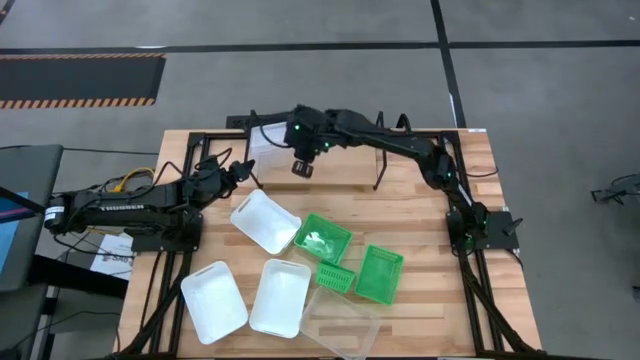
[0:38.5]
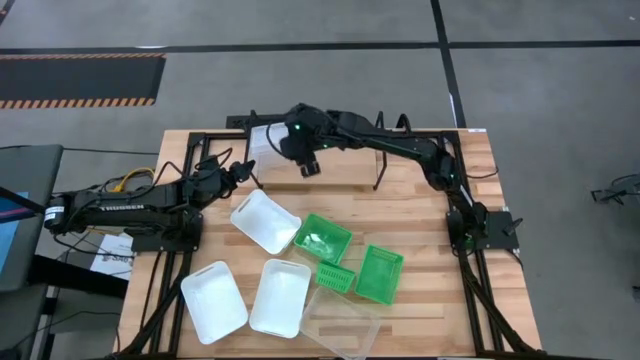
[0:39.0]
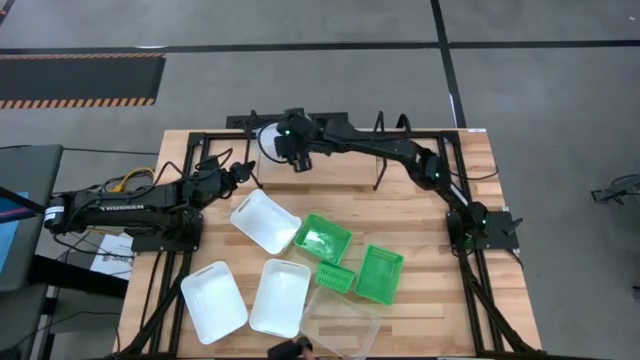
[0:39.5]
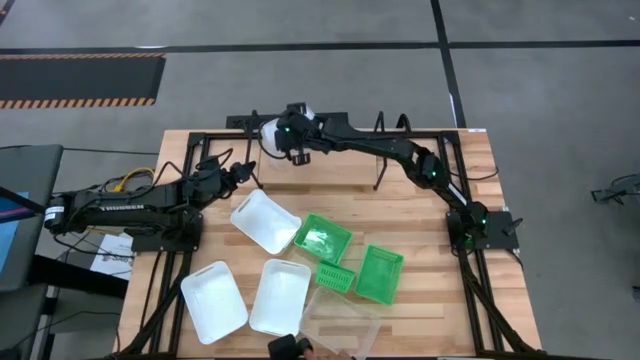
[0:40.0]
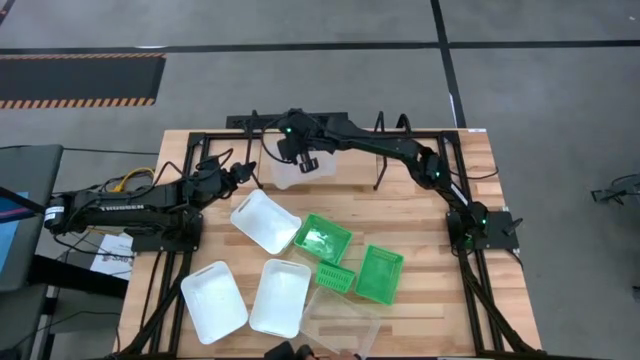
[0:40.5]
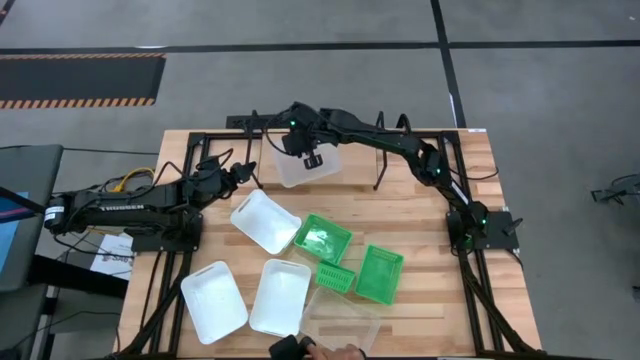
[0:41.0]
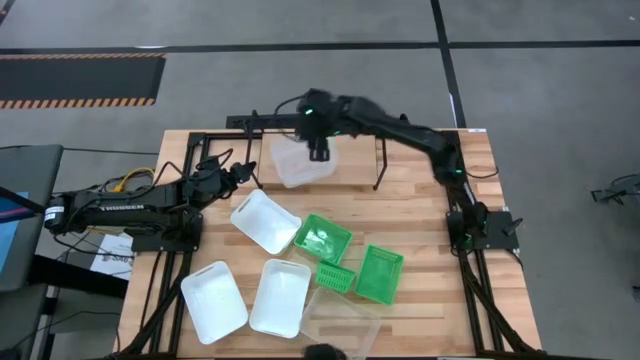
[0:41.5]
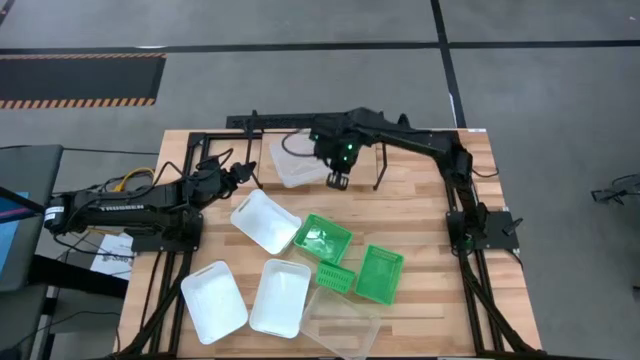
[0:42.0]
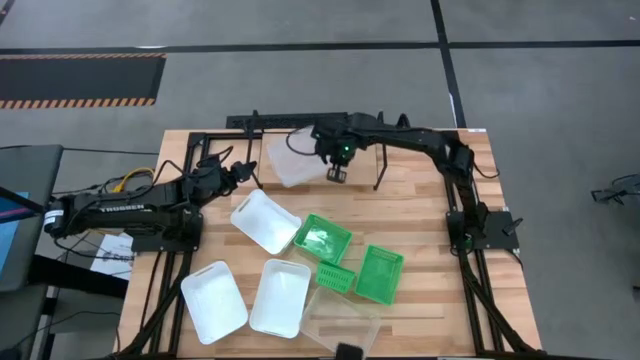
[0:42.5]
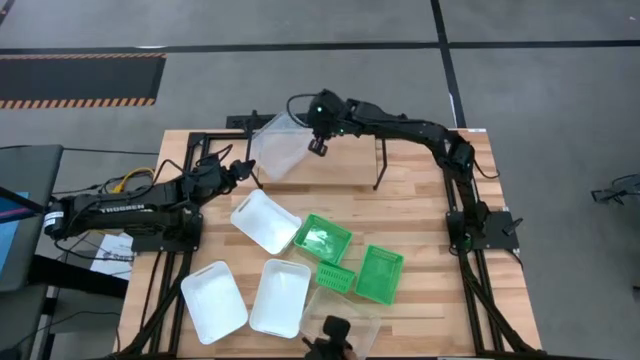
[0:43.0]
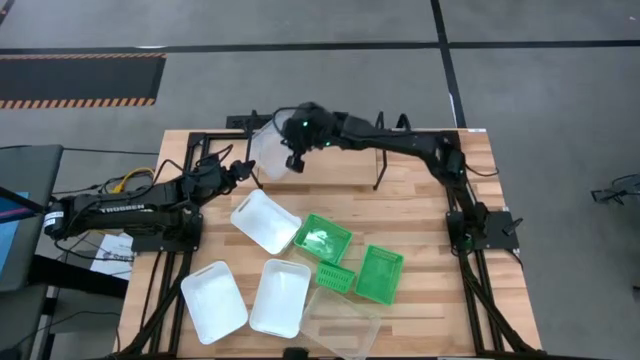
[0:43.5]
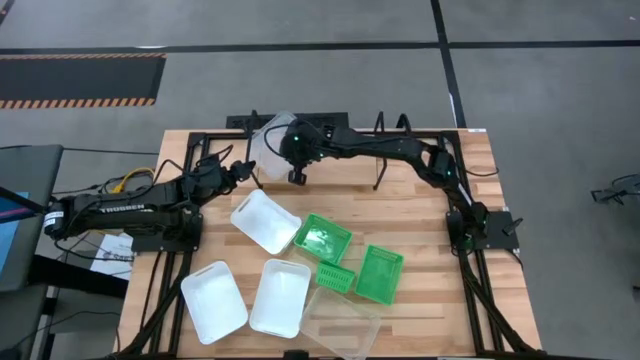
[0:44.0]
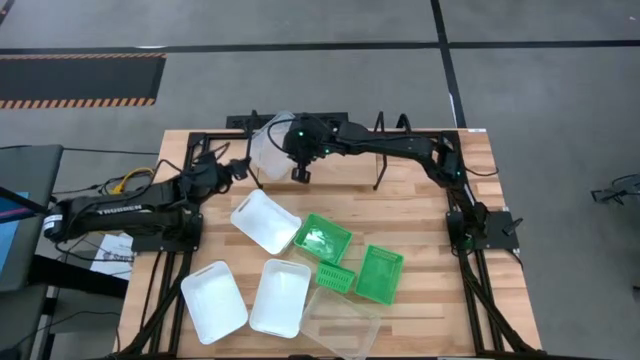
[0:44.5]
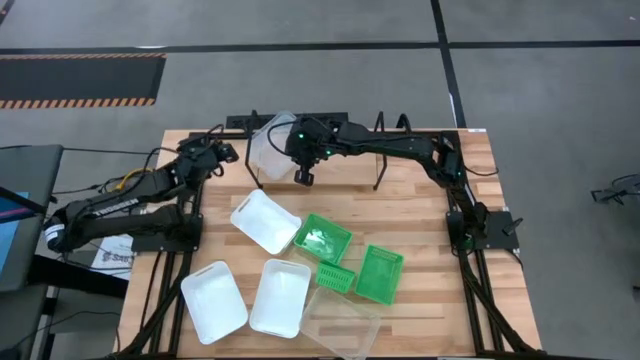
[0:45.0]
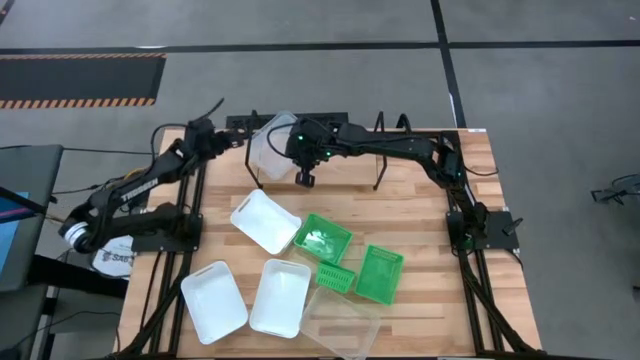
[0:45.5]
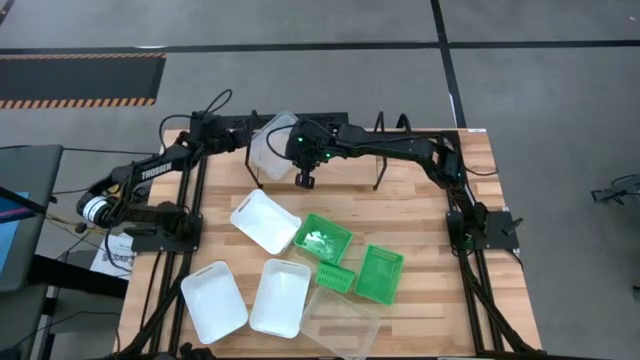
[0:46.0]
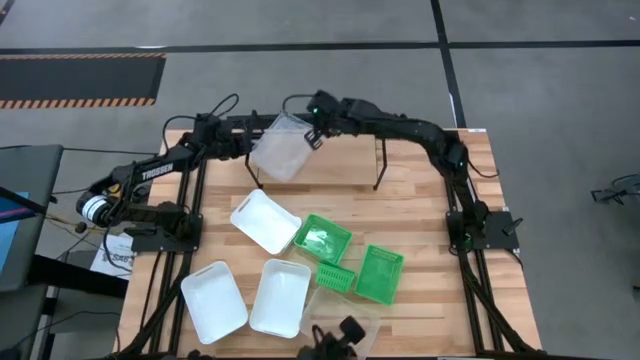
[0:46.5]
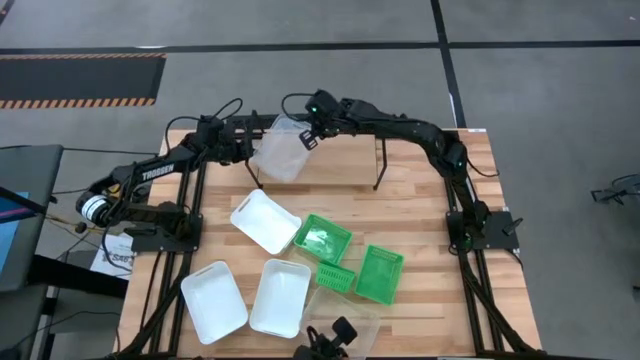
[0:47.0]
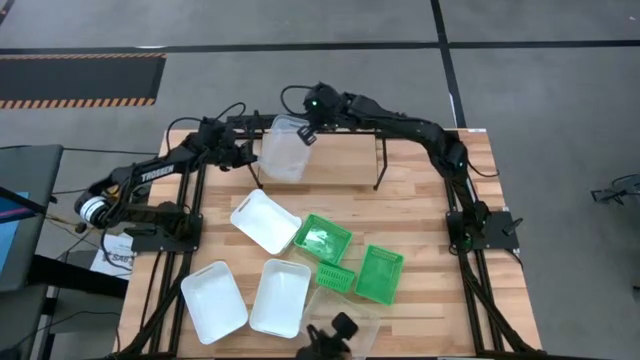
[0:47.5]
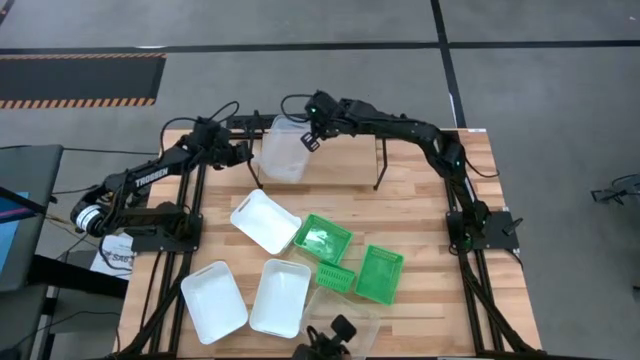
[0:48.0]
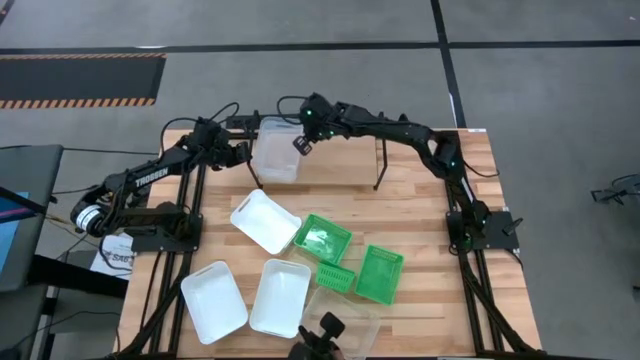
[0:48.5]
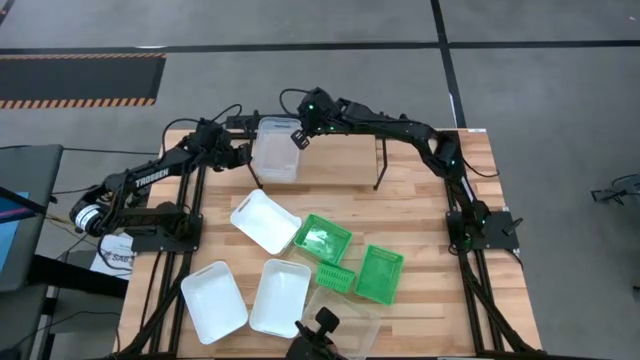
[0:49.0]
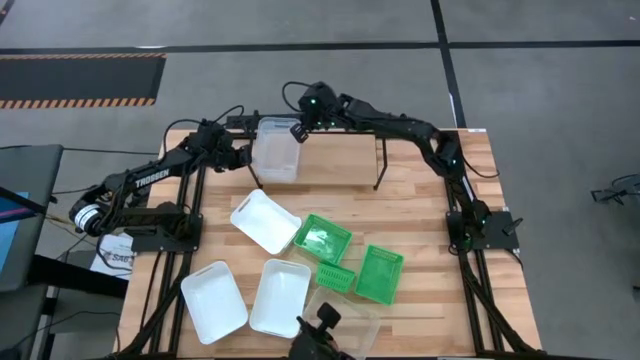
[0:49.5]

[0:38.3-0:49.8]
Task: Stack baskets on shelf by color
Adjust the transparent bins on the shelf

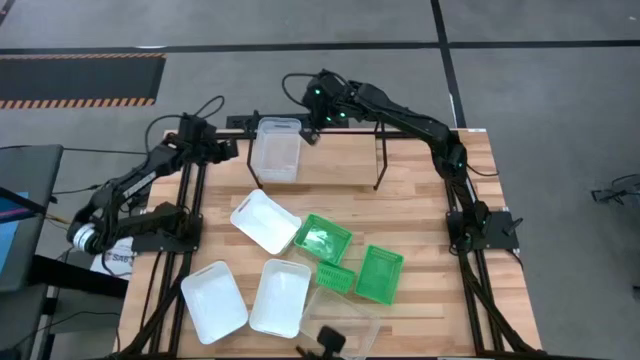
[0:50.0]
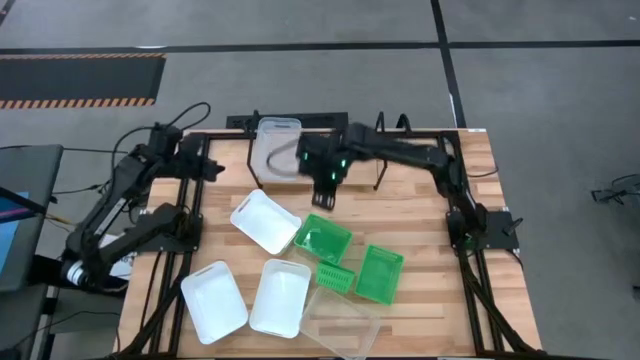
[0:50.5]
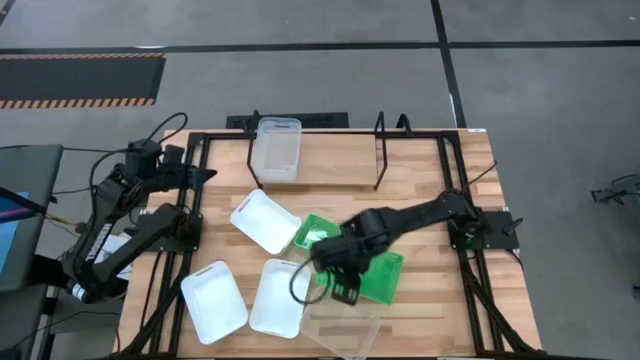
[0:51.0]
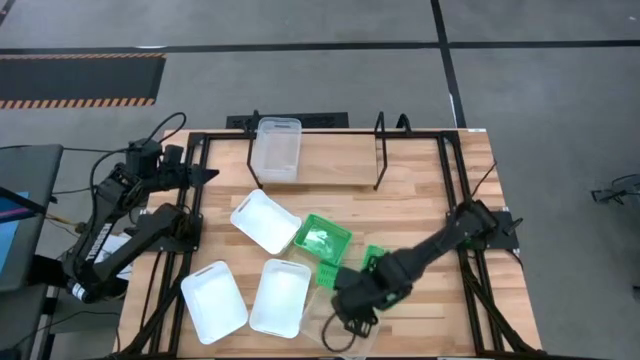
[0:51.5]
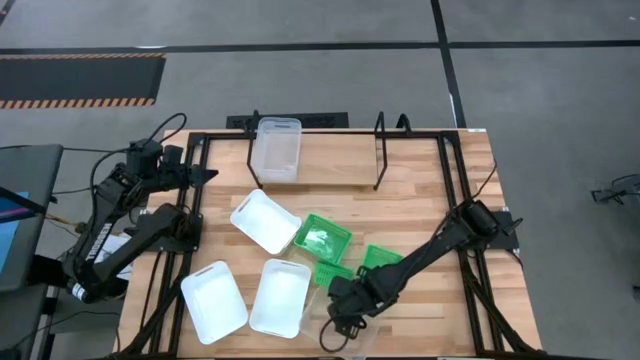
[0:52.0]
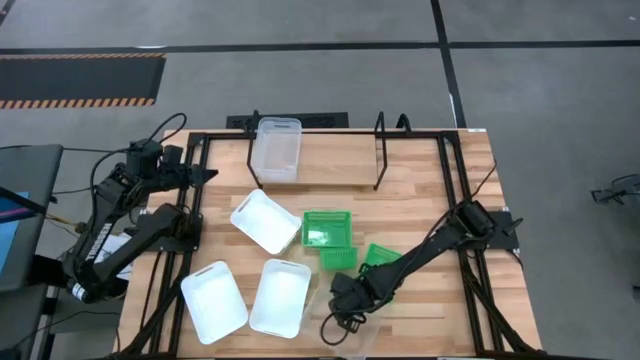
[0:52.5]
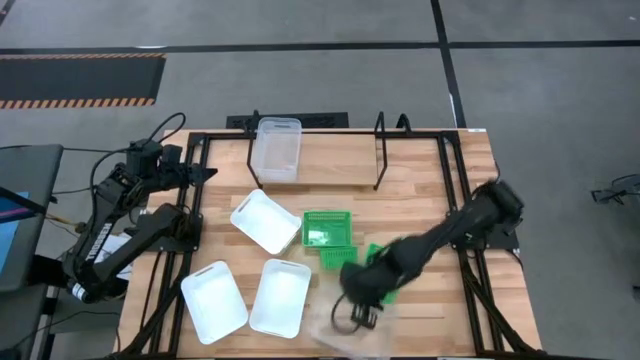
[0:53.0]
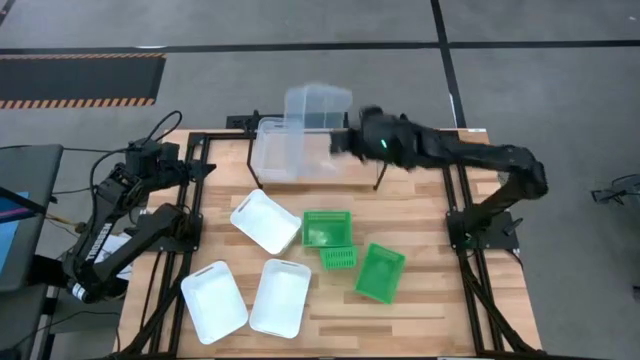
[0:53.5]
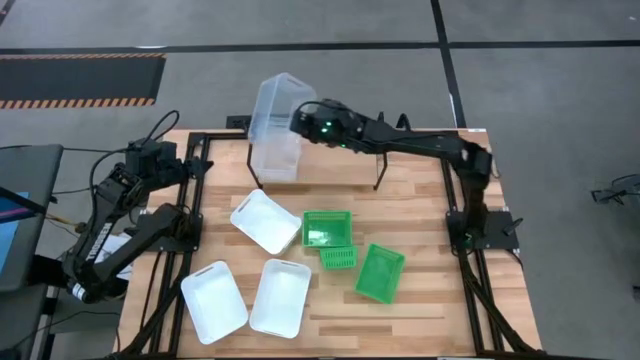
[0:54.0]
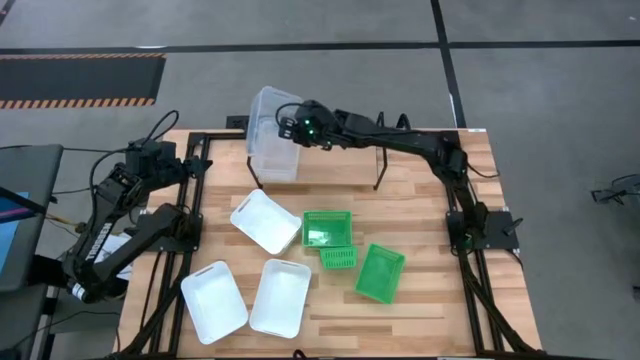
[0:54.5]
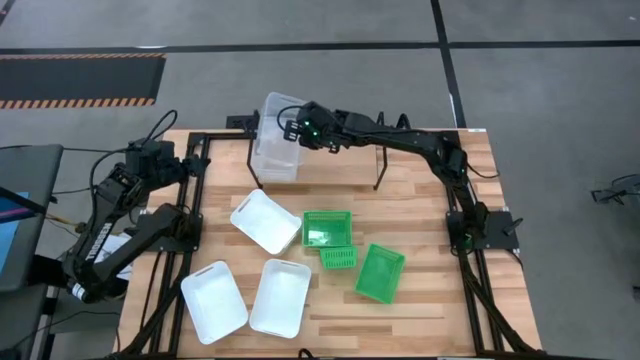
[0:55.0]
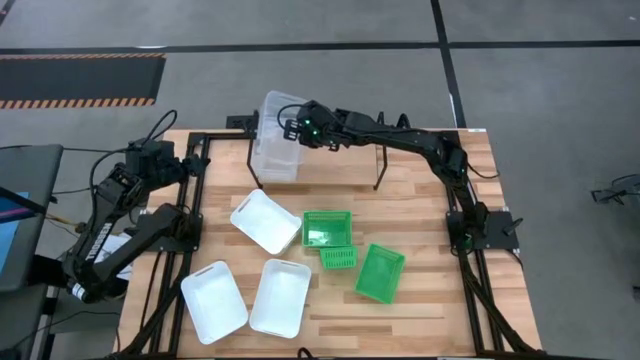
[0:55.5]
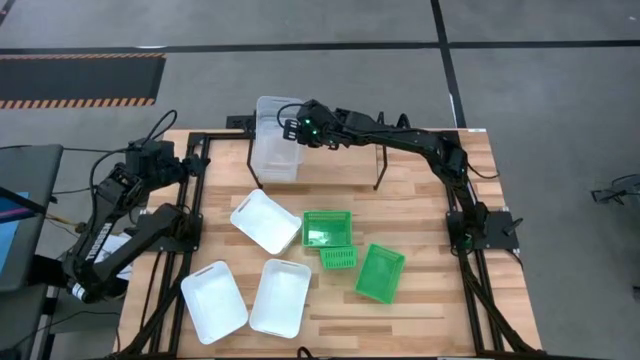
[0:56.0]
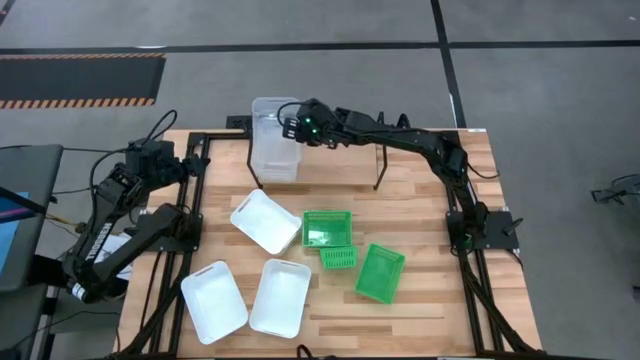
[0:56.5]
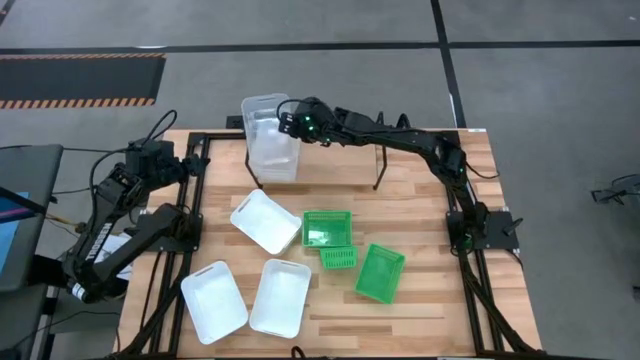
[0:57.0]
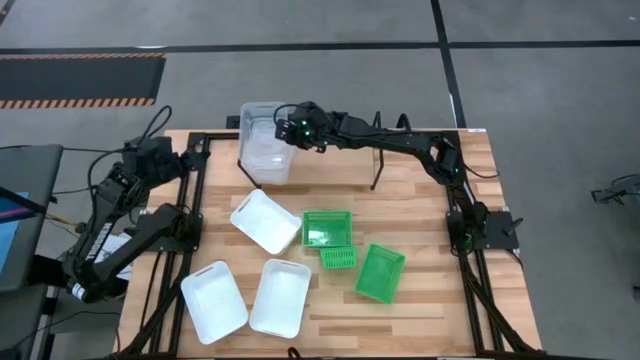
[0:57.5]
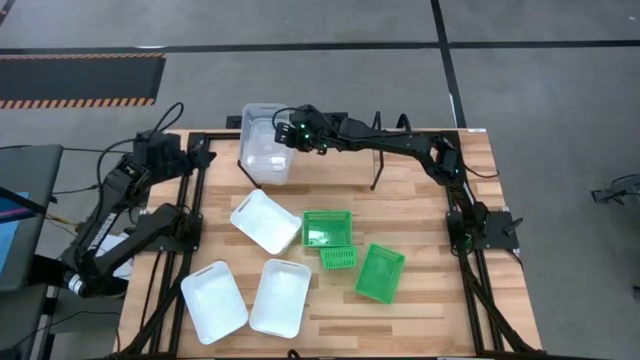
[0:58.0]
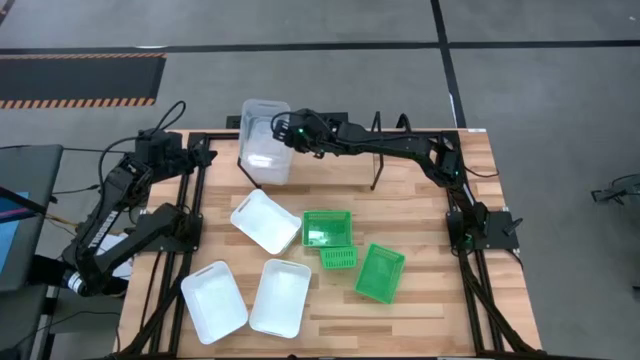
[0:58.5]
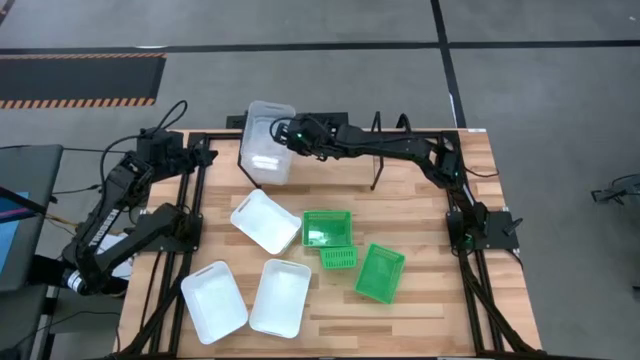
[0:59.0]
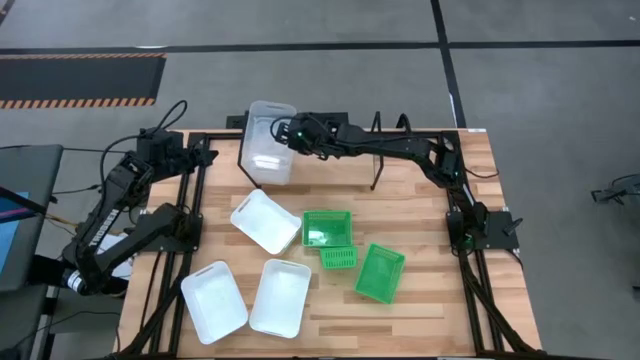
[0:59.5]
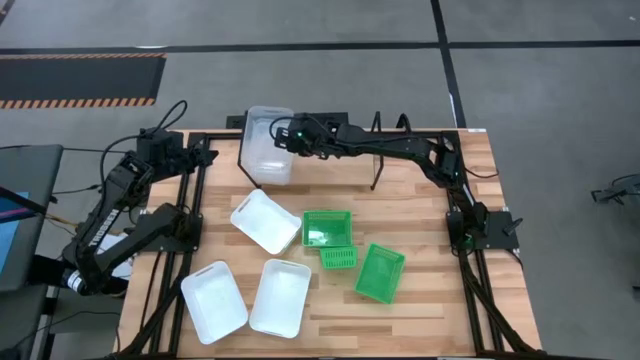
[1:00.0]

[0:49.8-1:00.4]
Stack the transparent bin on top of the transparent bins on the shelf
